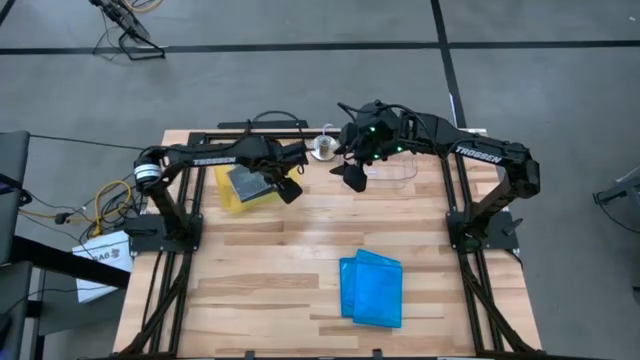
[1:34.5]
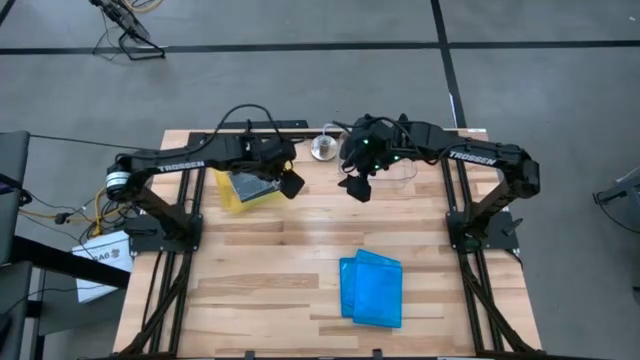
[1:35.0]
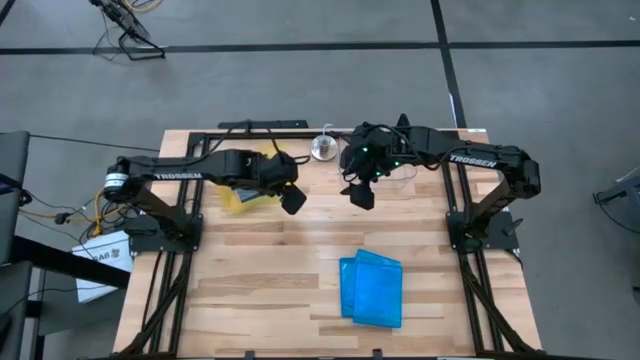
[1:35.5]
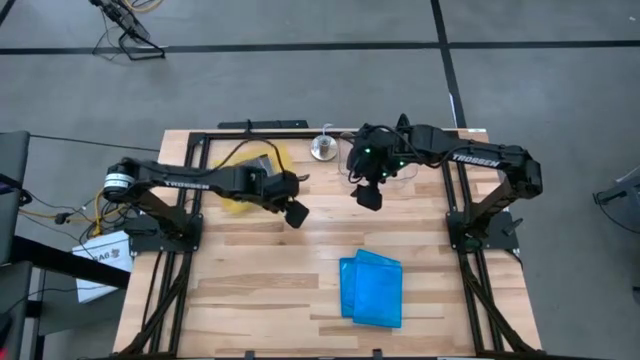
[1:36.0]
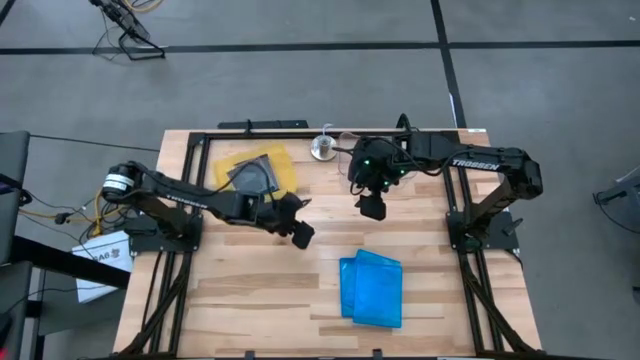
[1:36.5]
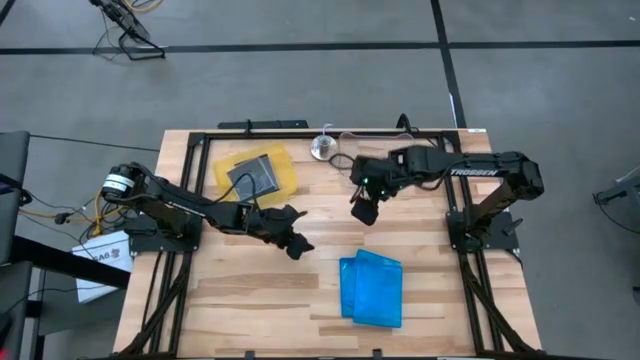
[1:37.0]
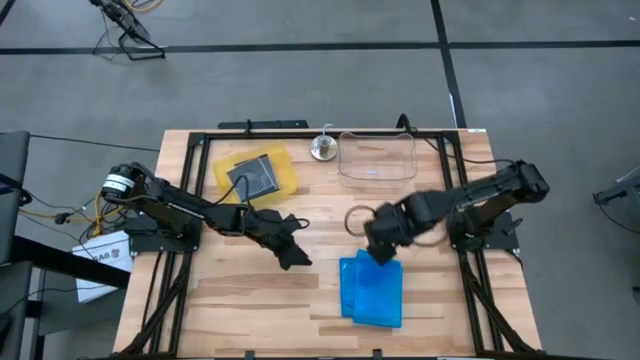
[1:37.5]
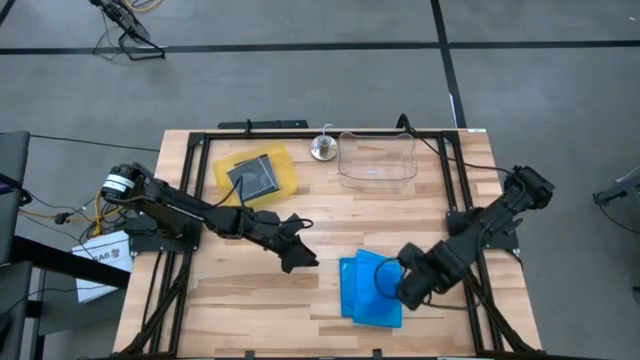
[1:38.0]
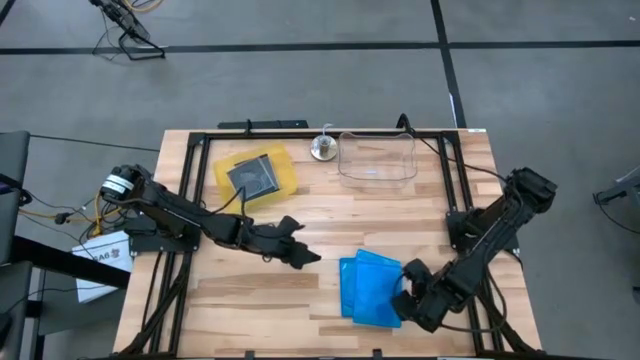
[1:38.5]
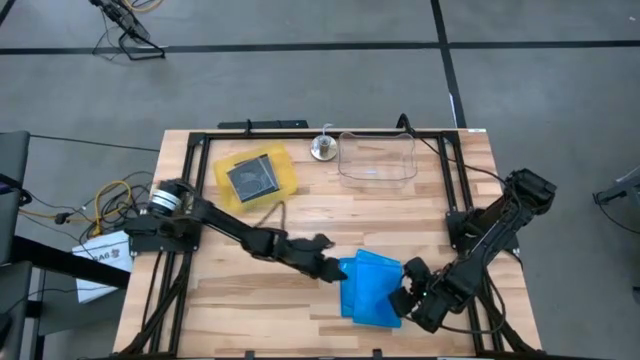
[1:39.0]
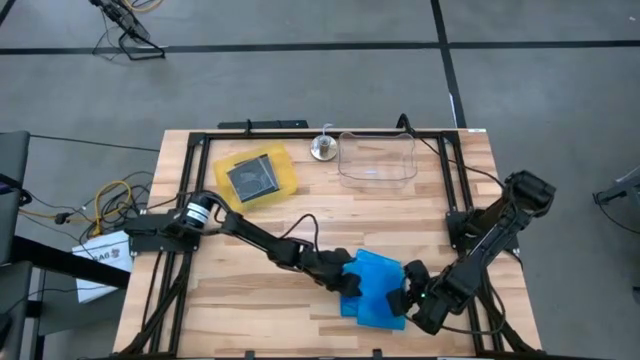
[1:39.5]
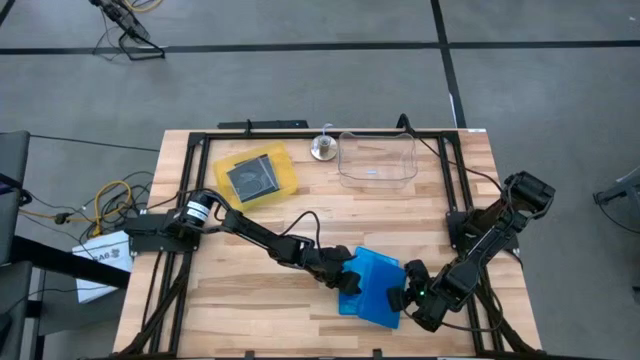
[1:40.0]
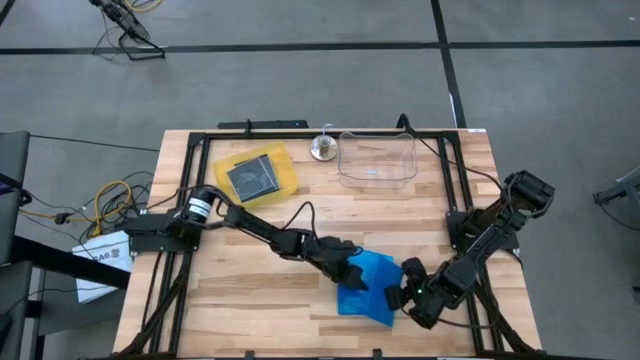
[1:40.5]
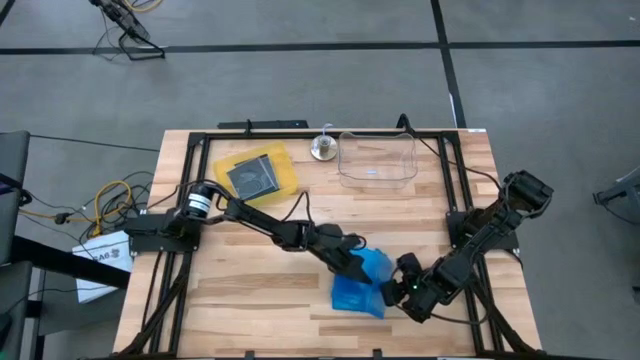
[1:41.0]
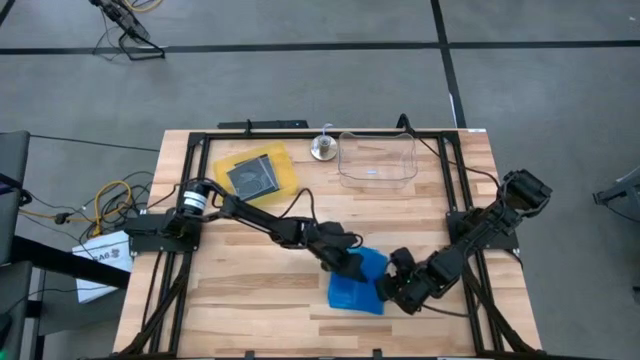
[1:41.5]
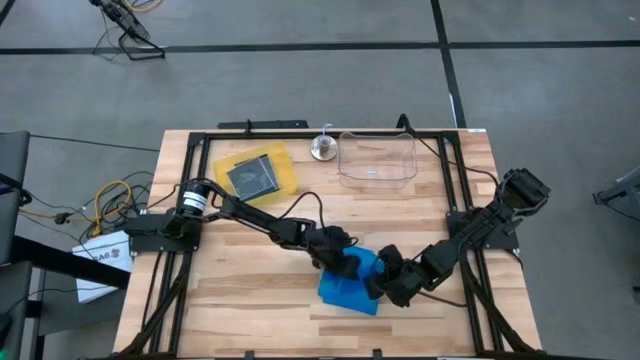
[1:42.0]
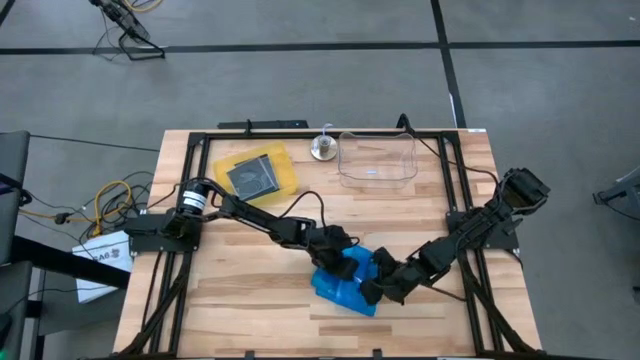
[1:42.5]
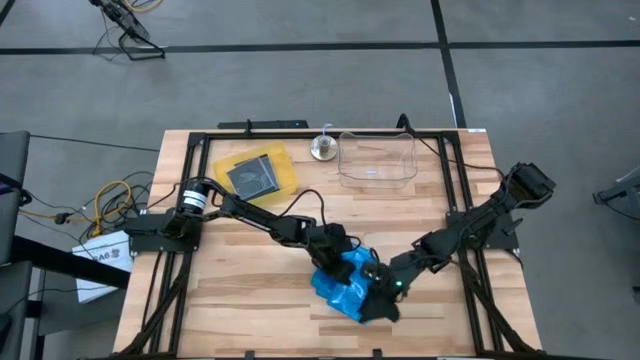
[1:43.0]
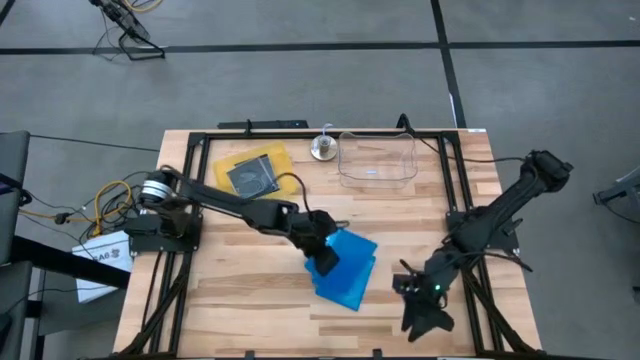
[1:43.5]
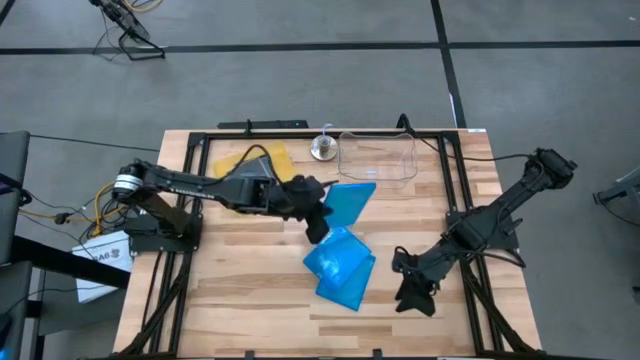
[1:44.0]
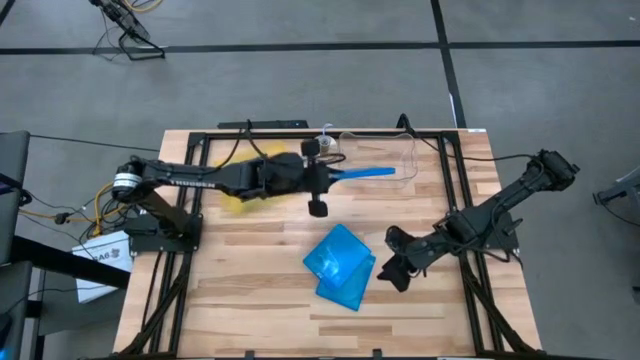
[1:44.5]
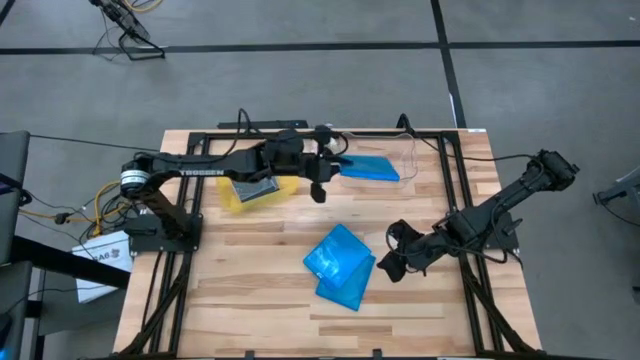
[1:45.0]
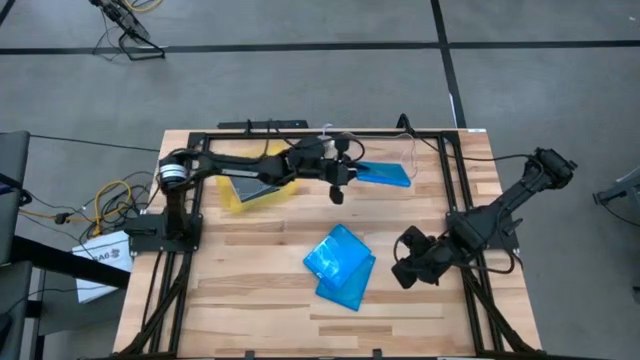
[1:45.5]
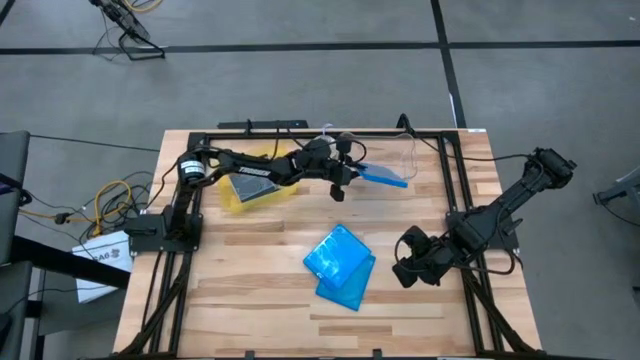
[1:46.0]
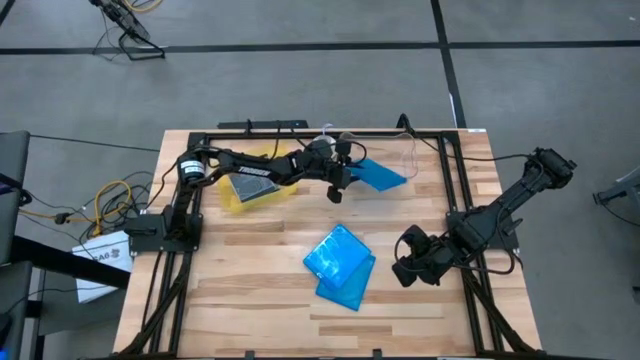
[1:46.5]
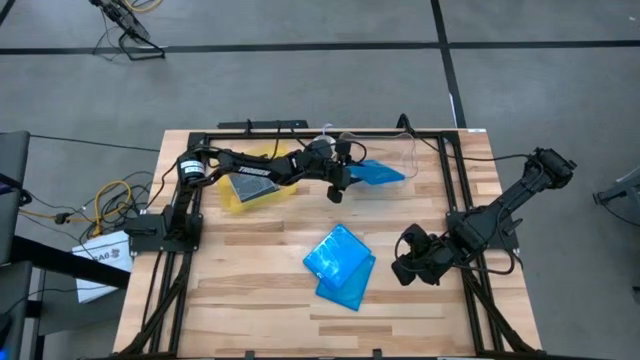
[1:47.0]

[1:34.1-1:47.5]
Task: Pick & place jewel cases by type
Put the top blue CD case into the transparent bin

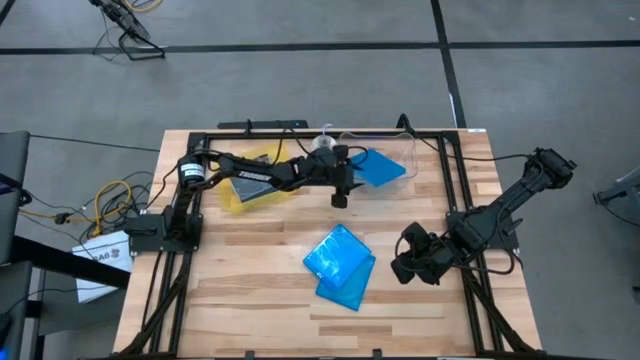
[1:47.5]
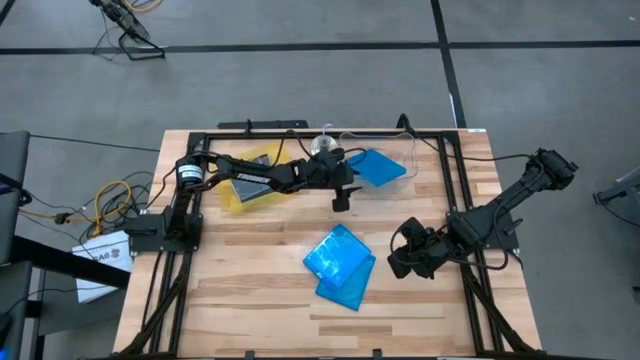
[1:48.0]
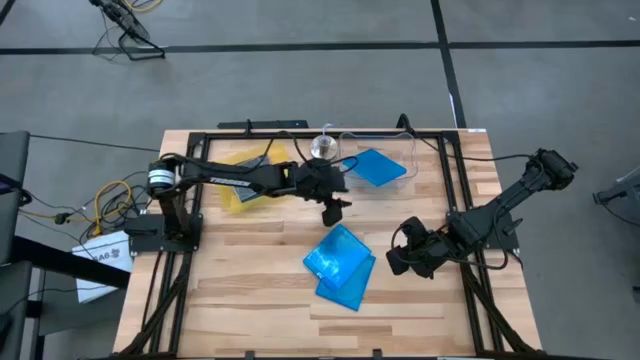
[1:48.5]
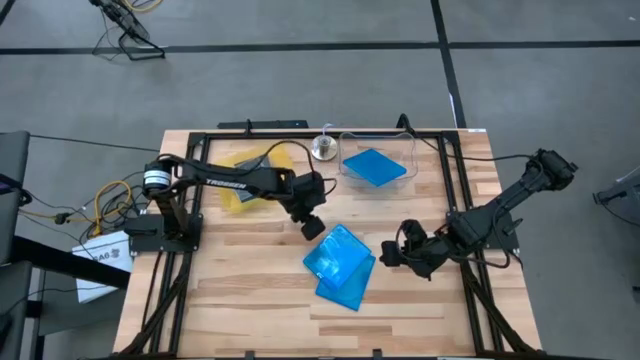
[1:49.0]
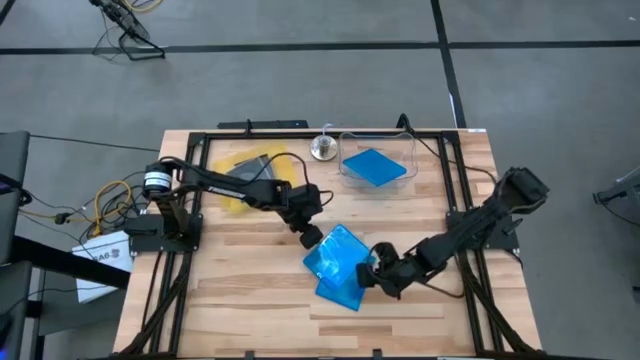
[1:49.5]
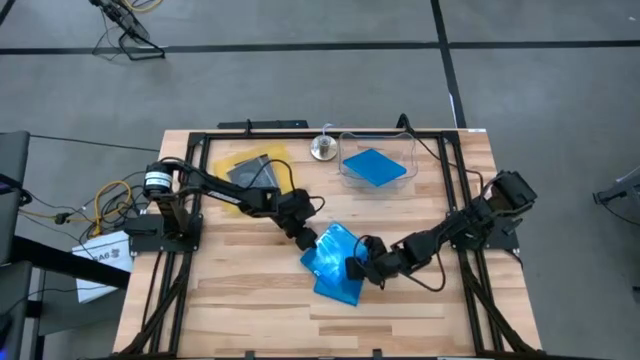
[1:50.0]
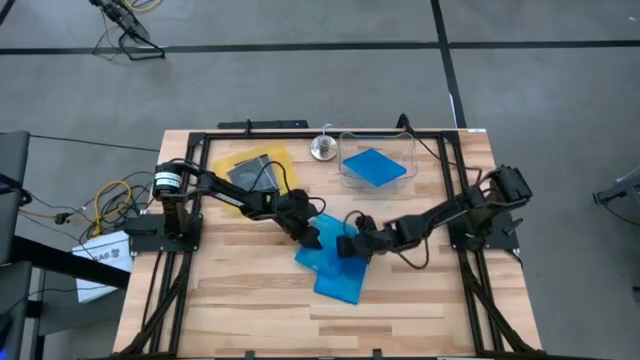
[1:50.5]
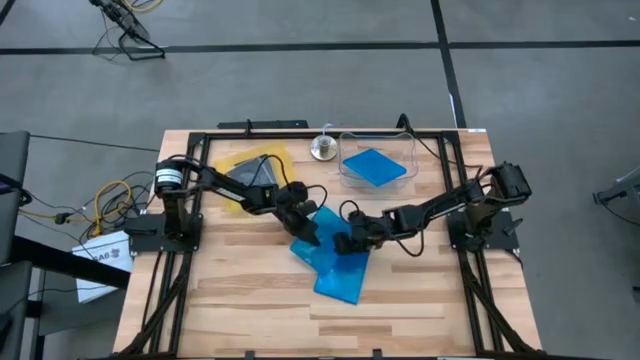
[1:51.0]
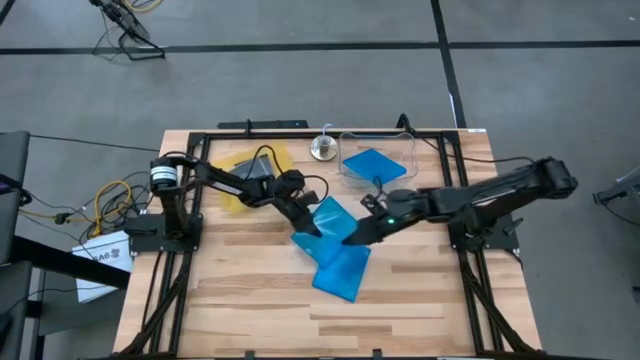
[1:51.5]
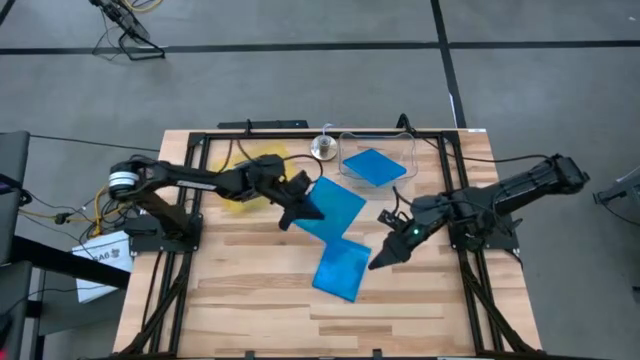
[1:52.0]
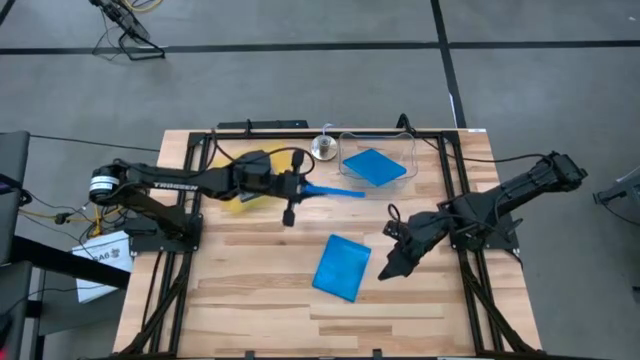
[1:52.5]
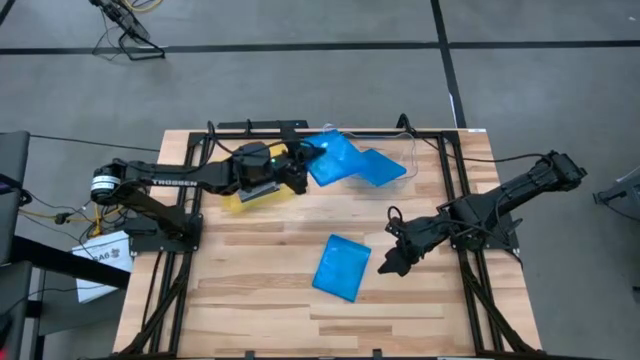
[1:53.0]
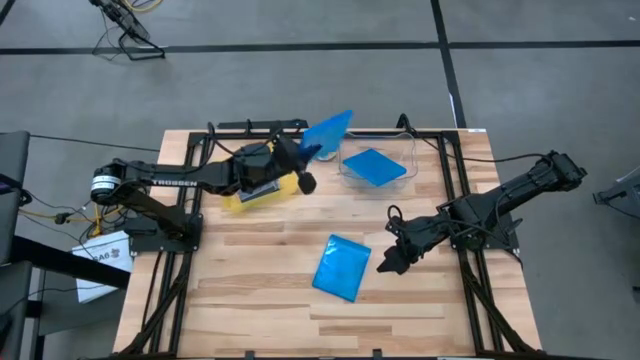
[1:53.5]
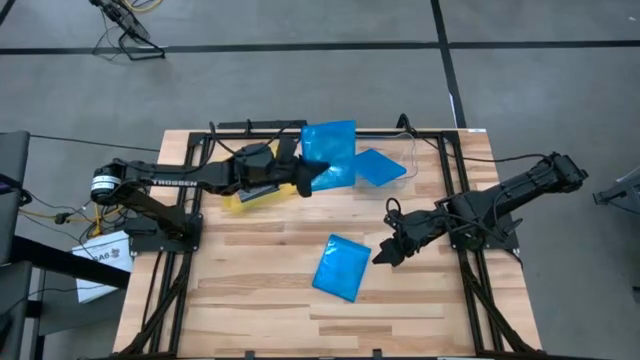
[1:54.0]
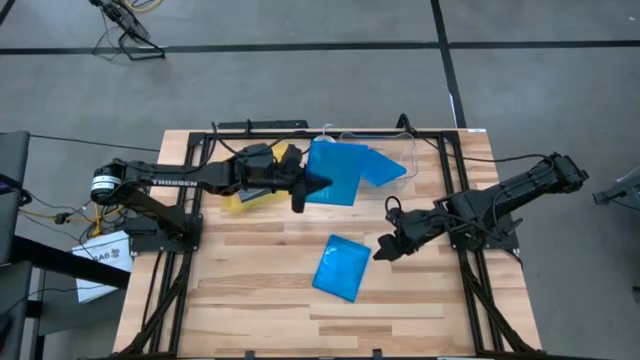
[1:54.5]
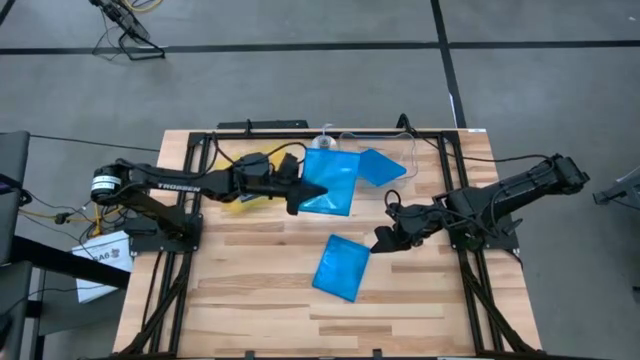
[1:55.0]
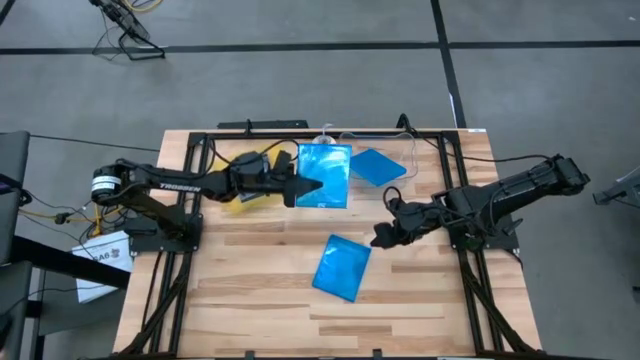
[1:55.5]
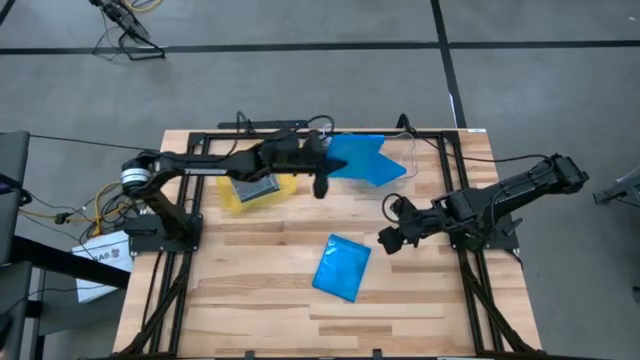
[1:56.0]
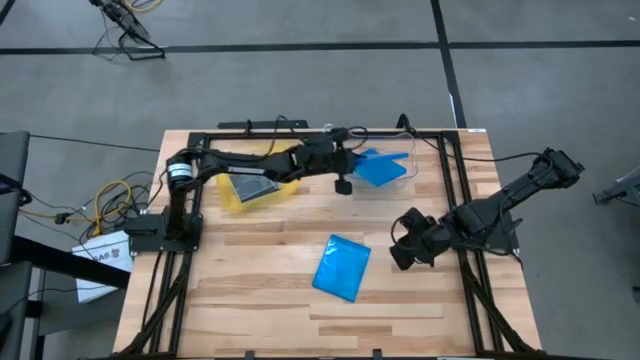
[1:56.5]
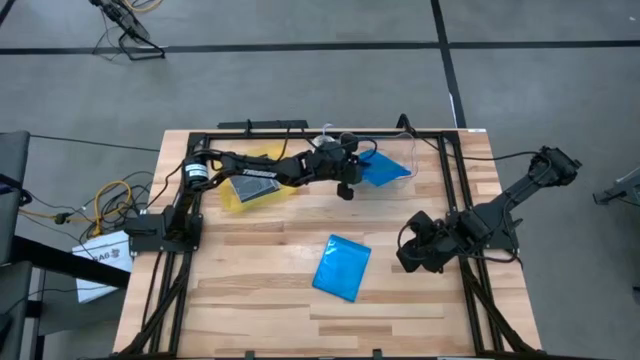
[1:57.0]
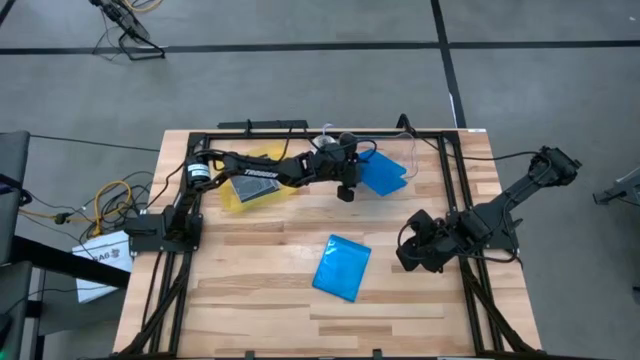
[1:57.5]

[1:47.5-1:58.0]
Put the top blue CD case into the transparent bin
